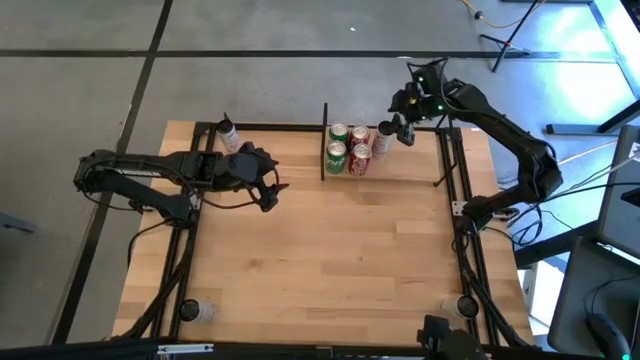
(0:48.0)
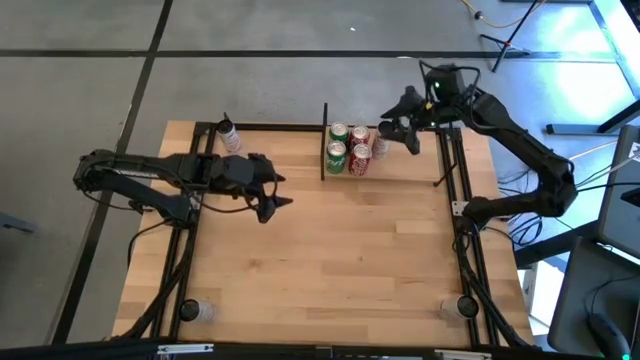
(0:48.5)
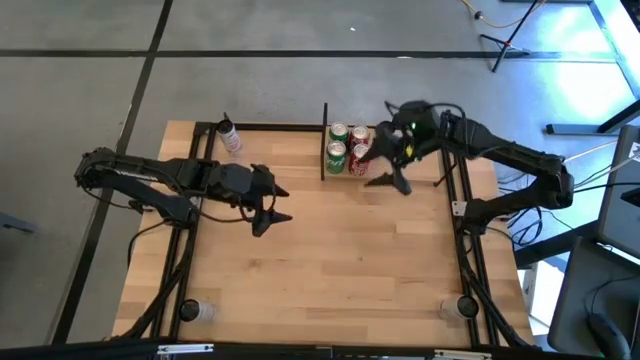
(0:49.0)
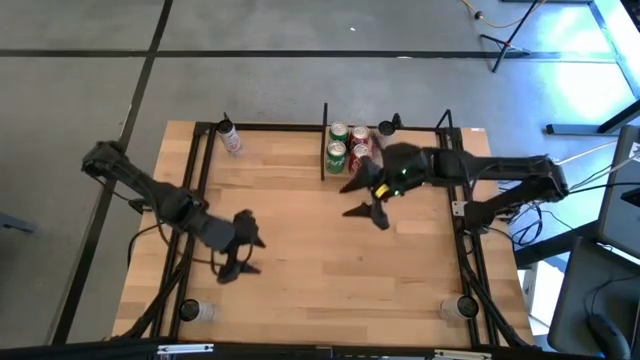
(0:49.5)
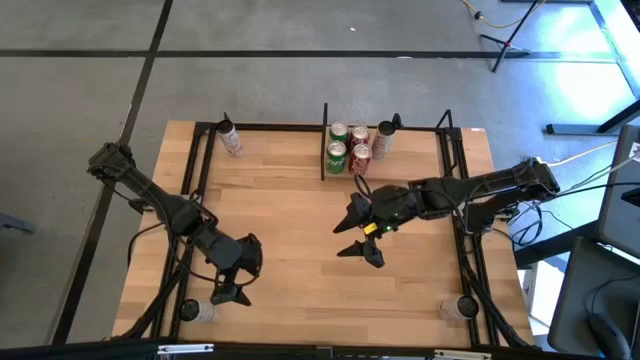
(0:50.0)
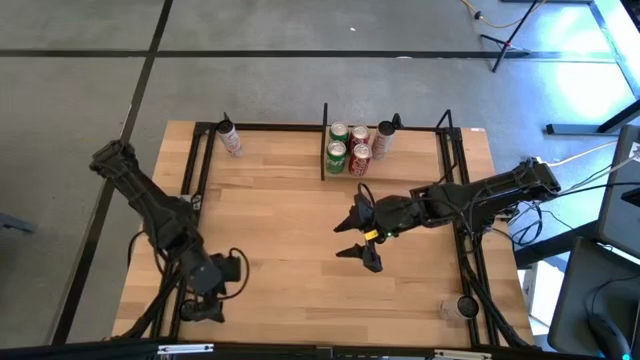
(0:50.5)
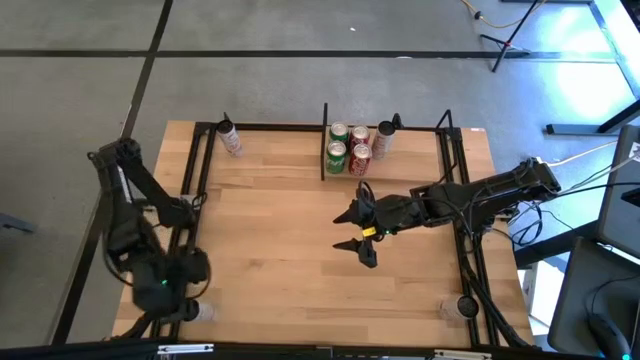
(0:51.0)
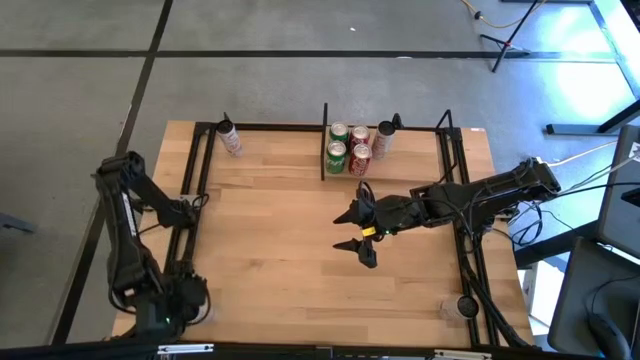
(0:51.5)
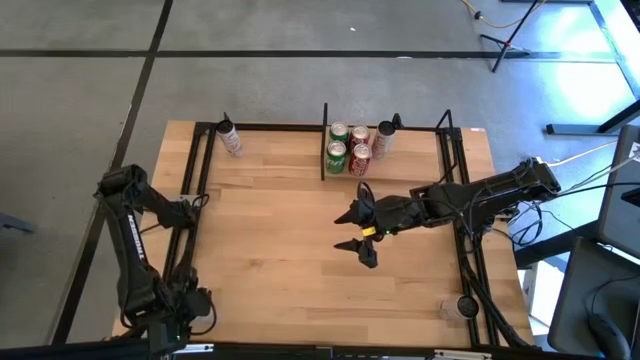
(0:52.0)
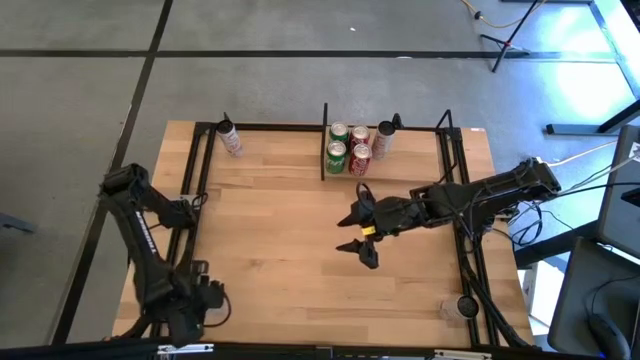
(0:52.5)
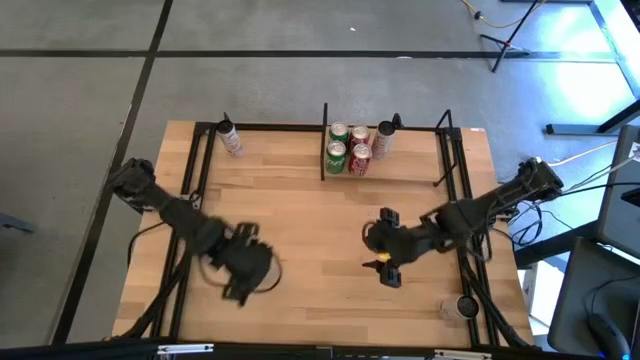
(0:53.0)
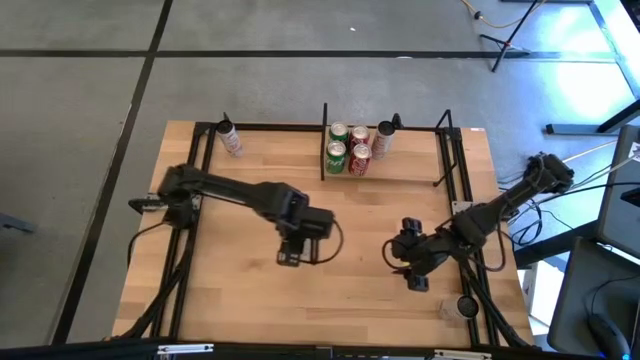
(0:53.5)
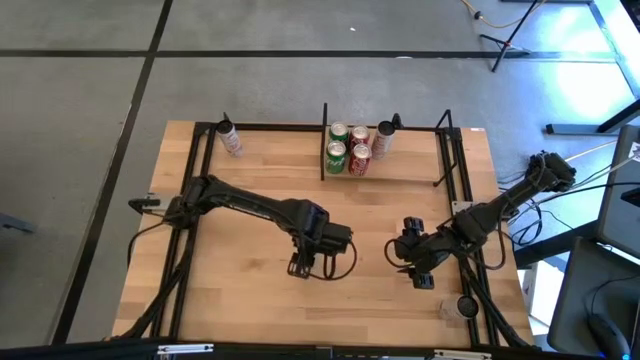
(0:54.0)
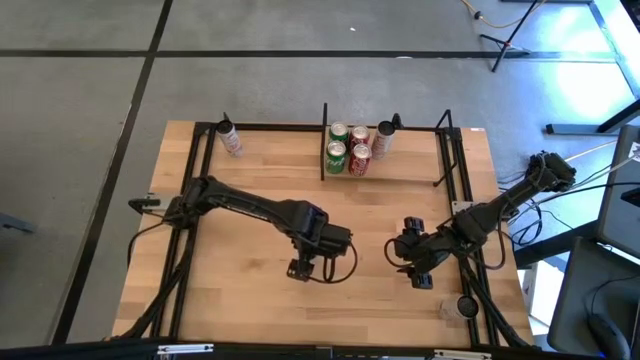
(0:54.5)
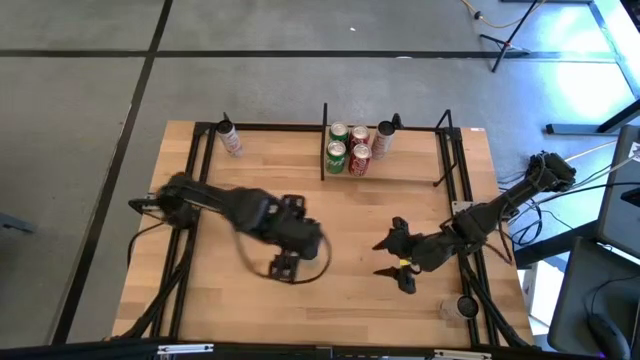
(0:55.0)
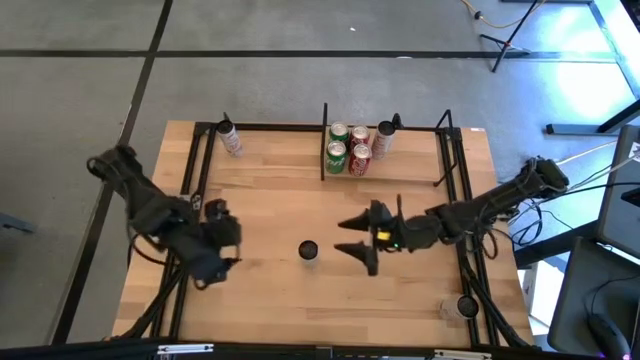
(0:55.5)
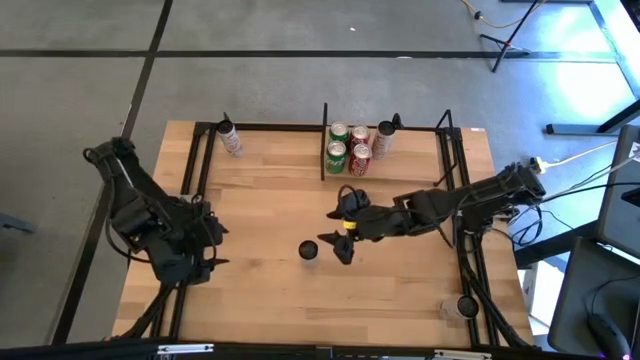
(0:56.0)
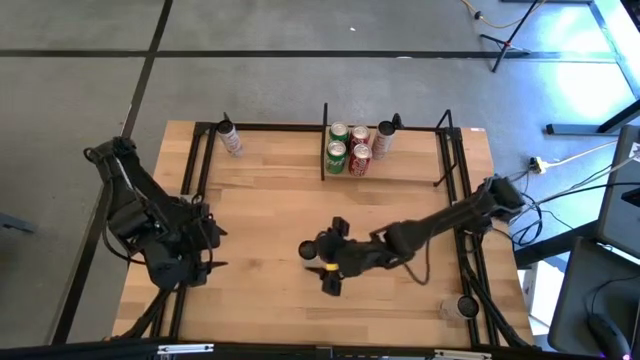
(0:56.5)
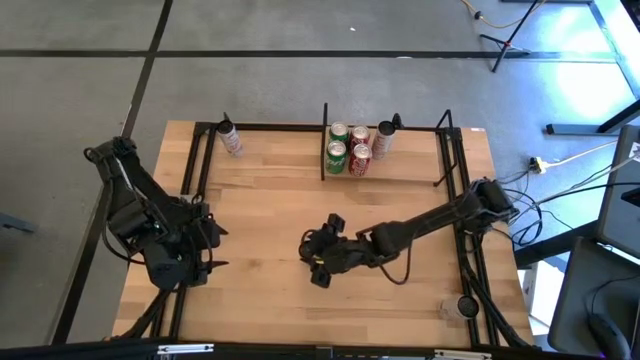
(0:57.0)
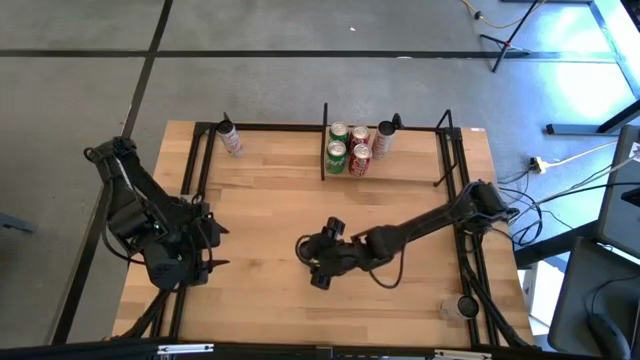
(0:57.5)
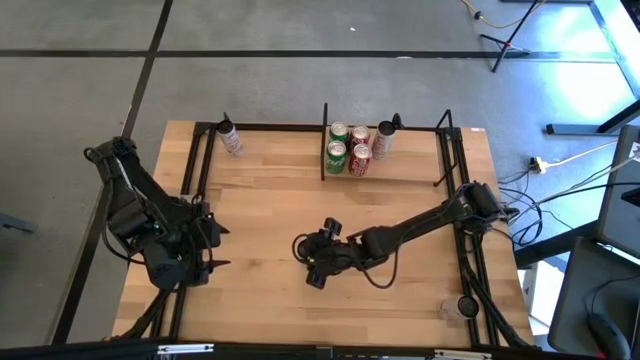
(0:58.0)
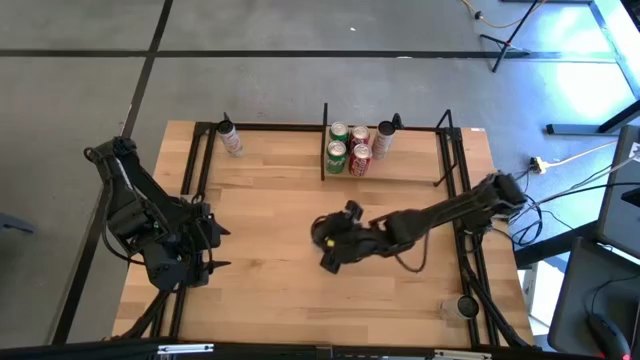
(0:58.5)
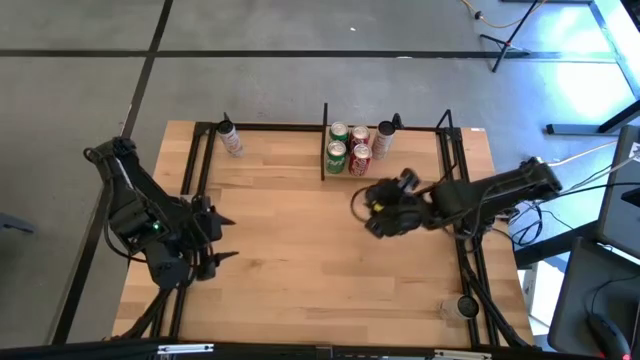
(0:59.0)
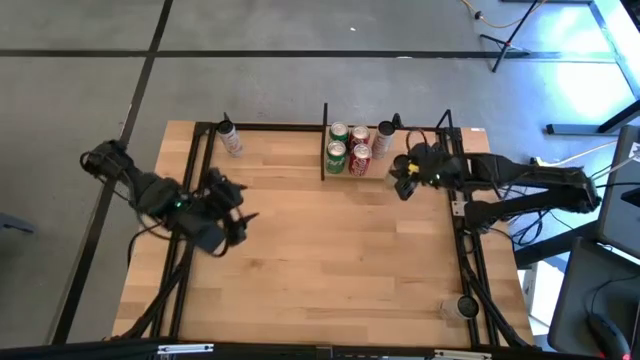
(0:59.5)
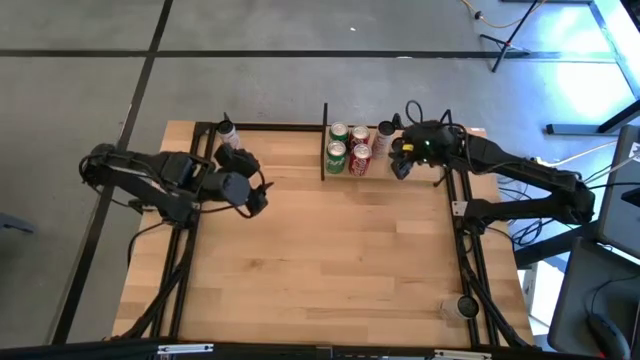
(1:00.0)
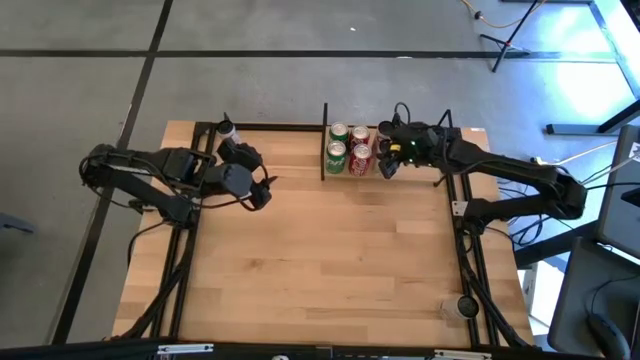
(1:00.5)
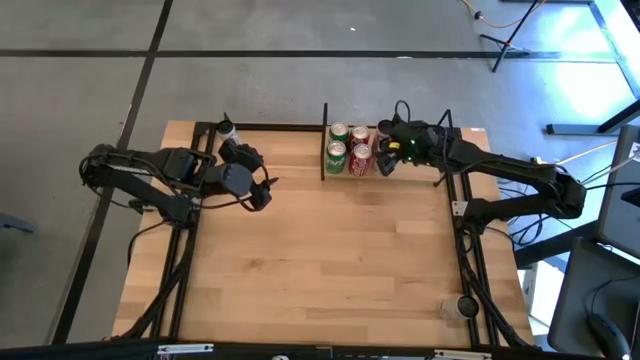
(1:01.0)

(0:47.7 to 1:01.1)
Task: Place canned beverage on shelf
Put the white yellow soda can on the shelf aligned with the other white yellow soda can

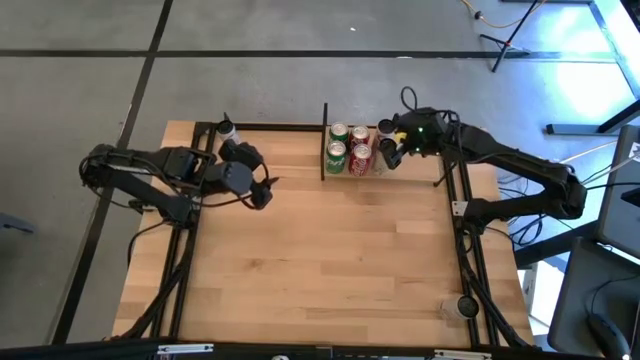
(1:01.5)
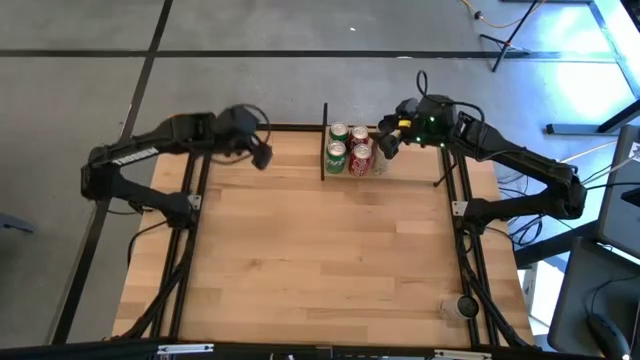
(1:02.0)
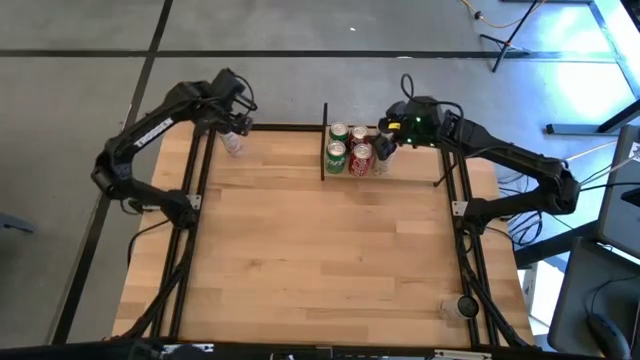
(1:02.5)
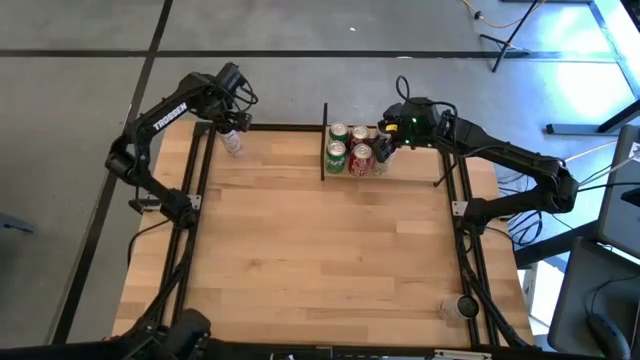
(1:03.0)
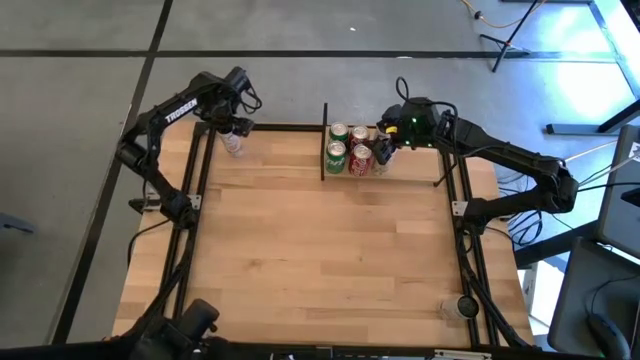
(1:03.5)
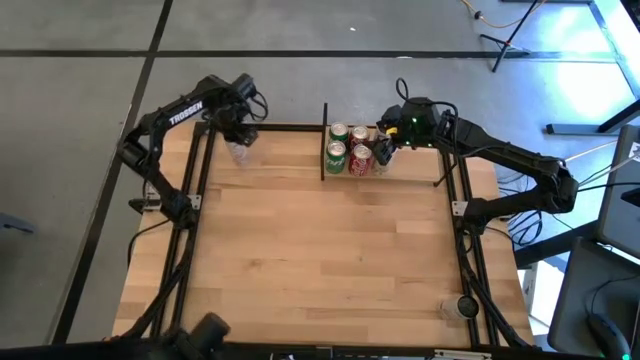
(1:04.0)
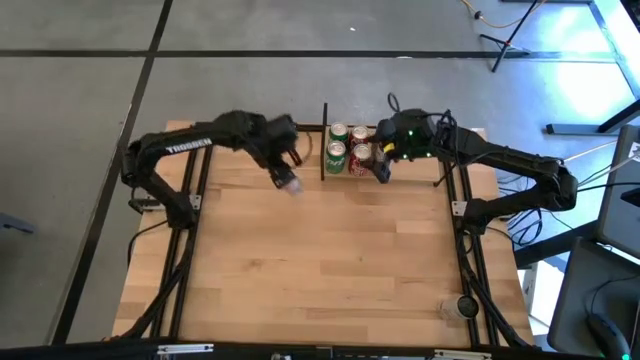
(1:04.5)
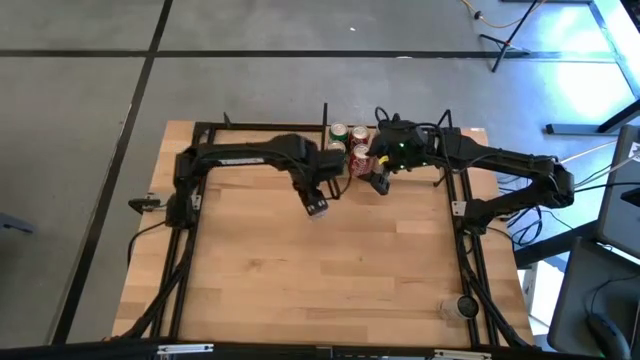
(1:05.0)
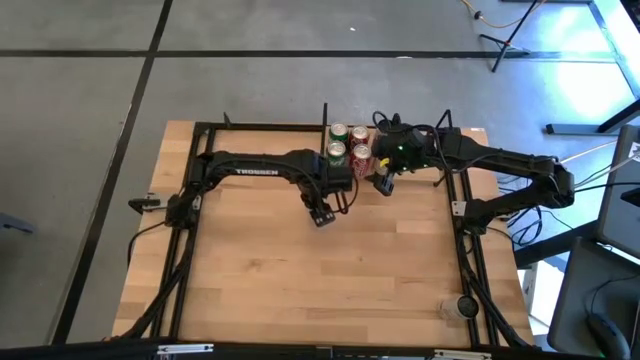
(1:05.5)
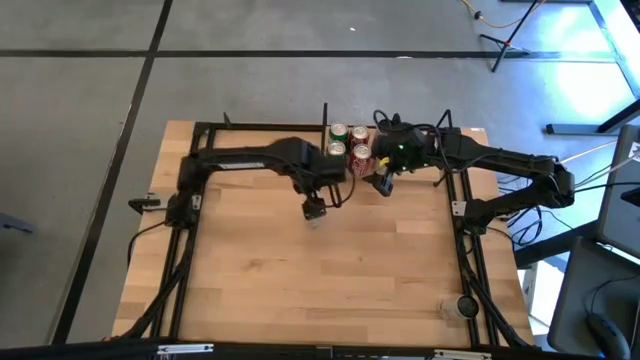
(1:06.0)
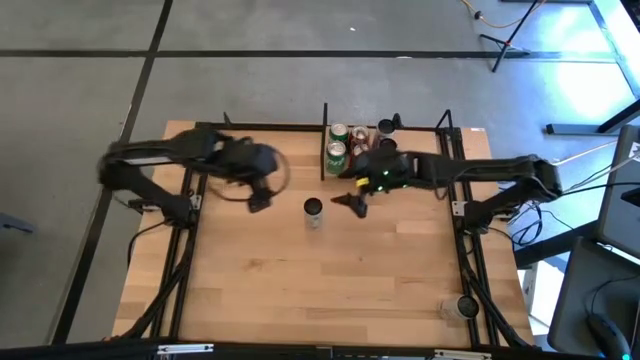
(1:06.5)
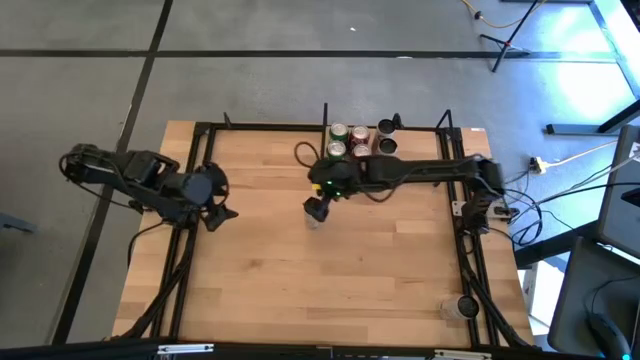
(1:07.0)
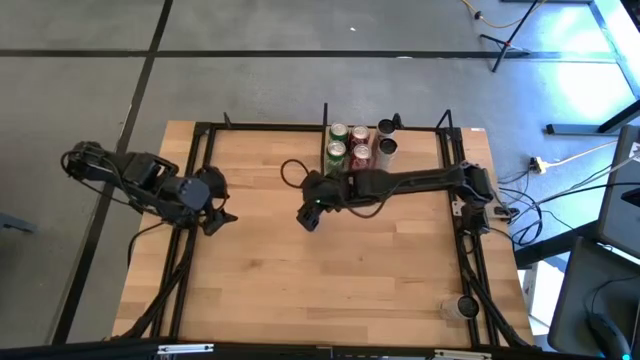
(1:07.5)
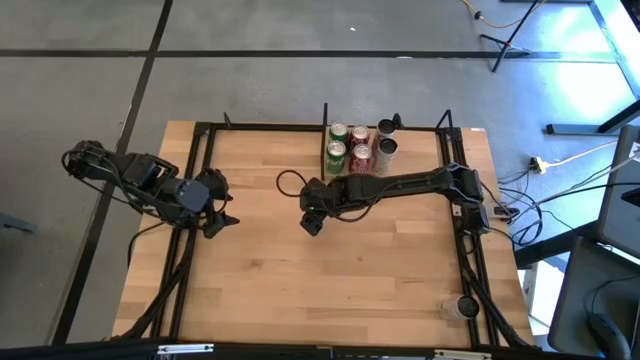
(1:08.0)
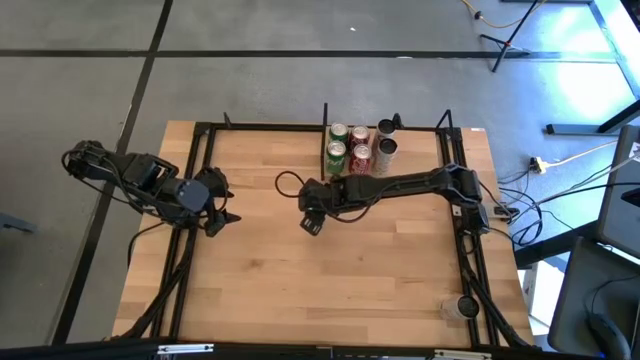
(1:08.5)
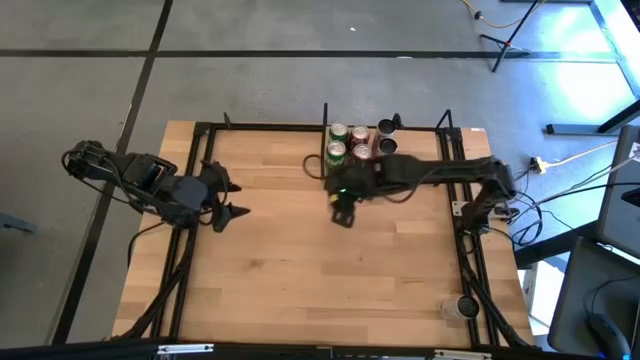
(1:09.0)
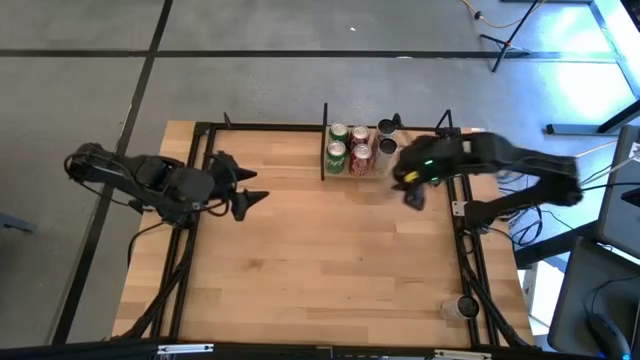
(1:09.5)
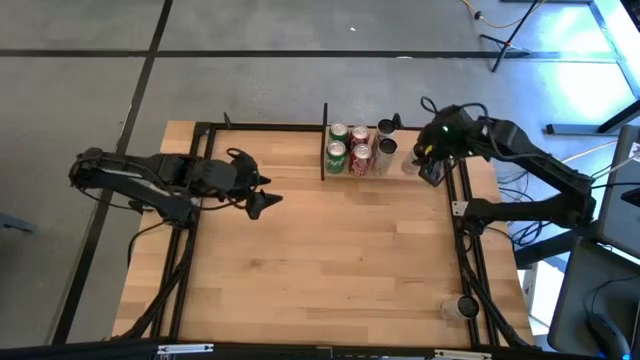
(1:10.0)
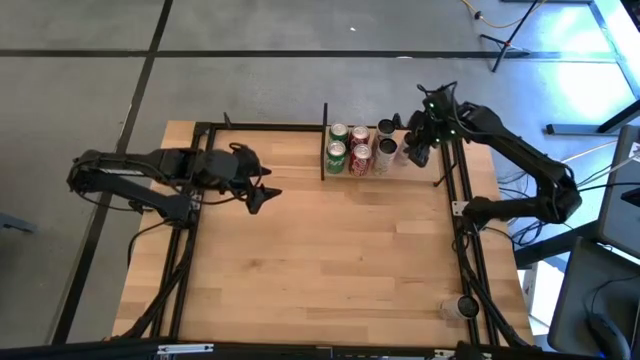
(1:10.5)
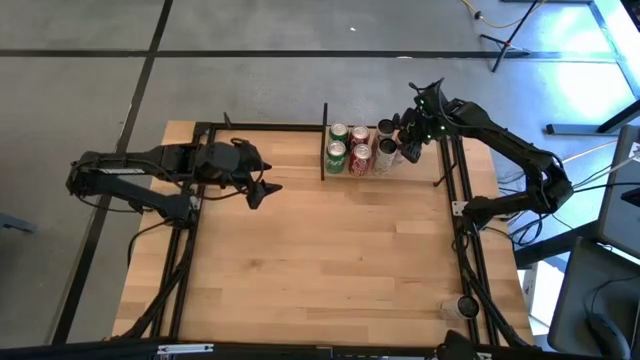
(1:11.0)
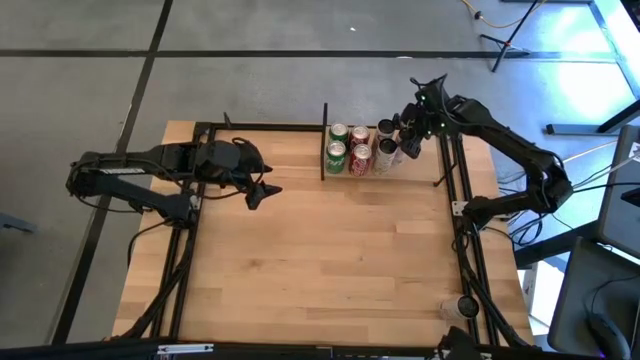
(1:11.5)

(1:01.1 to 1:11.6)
Put the top white pink soda can on the shelf
